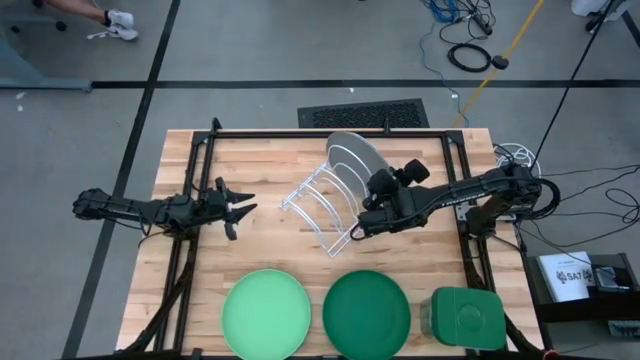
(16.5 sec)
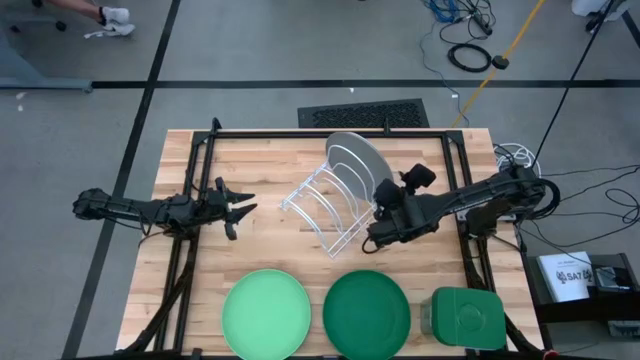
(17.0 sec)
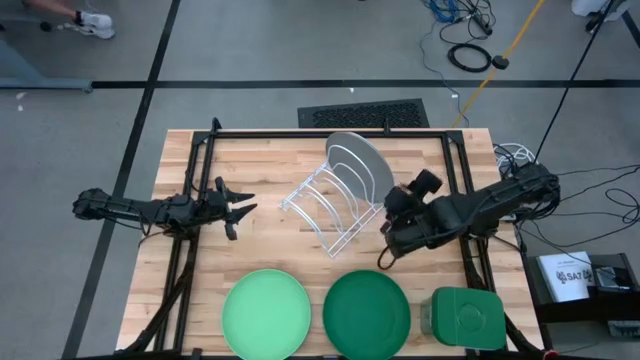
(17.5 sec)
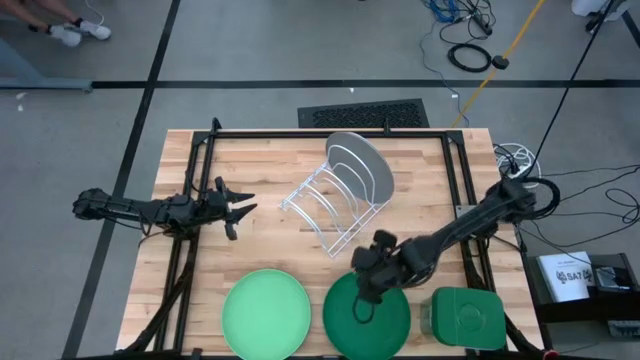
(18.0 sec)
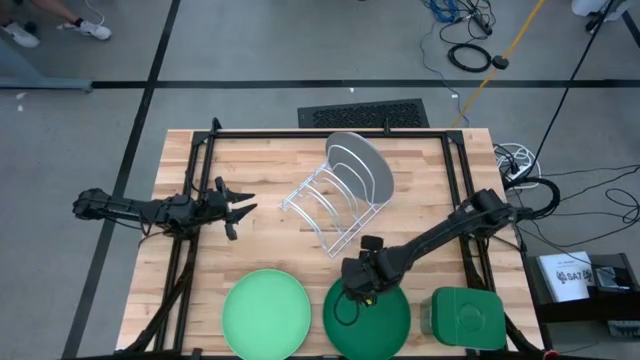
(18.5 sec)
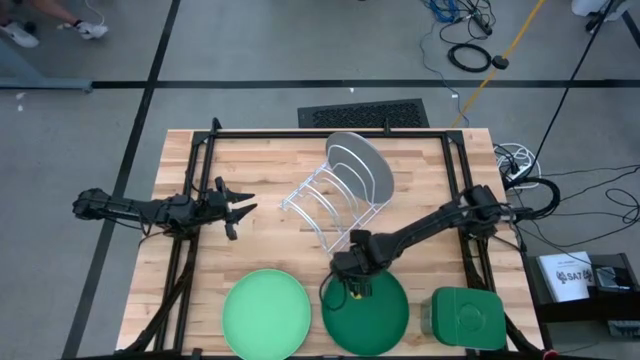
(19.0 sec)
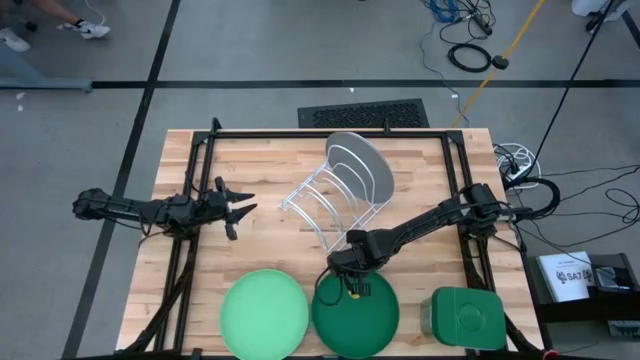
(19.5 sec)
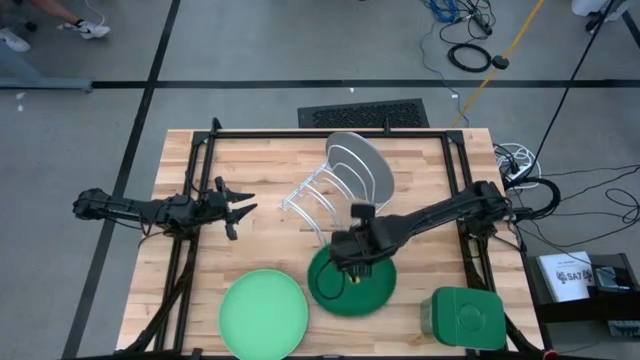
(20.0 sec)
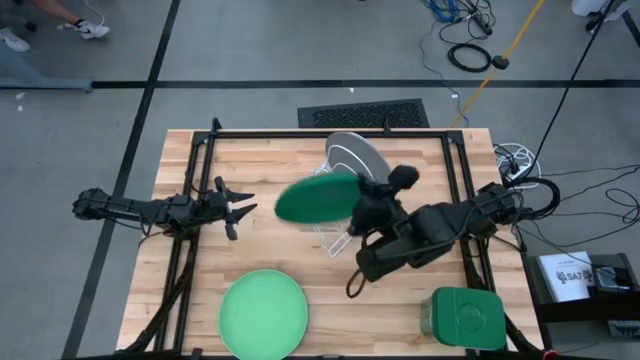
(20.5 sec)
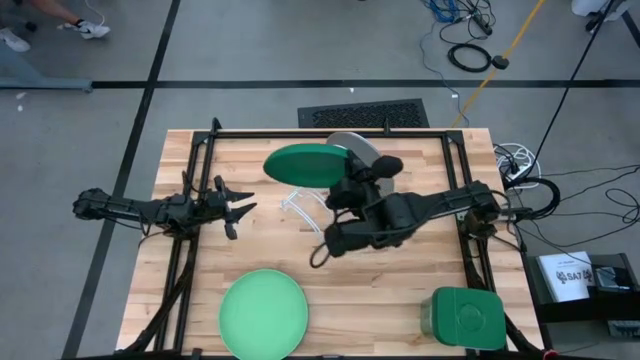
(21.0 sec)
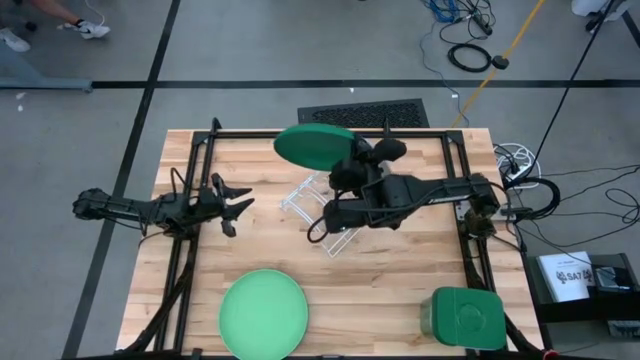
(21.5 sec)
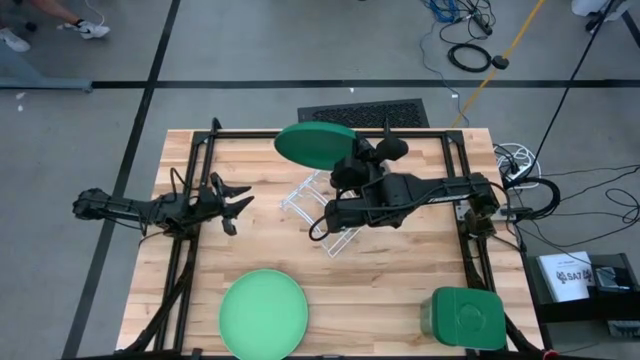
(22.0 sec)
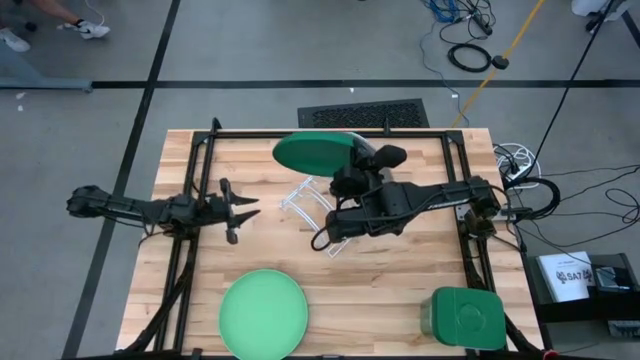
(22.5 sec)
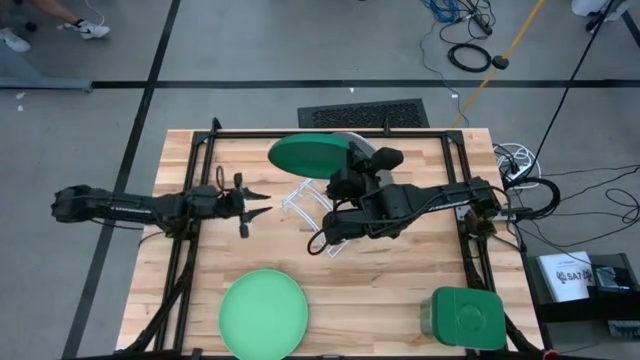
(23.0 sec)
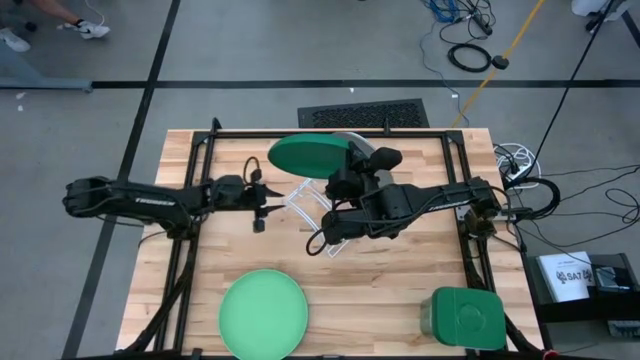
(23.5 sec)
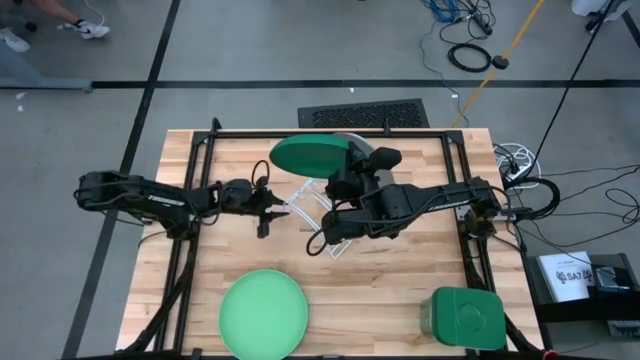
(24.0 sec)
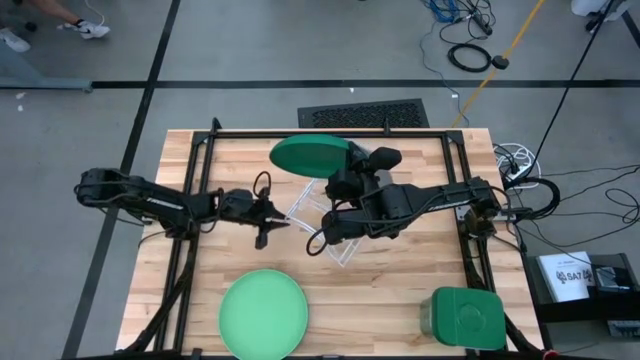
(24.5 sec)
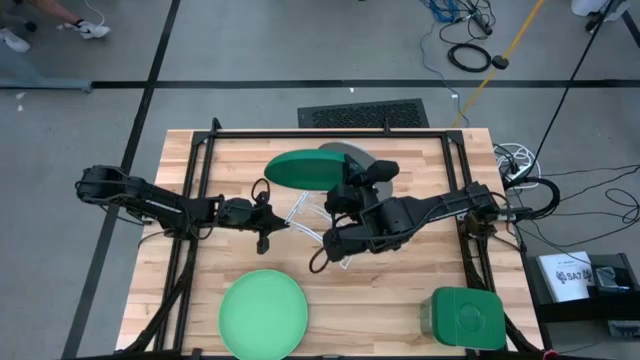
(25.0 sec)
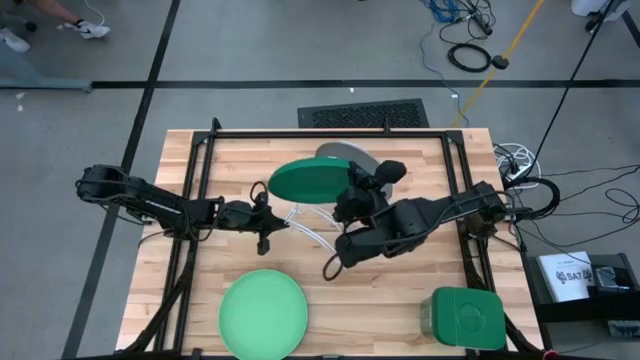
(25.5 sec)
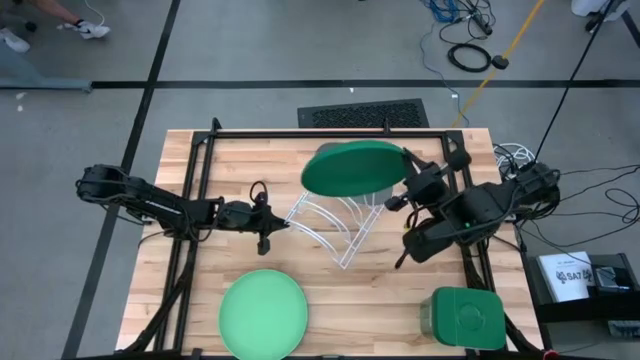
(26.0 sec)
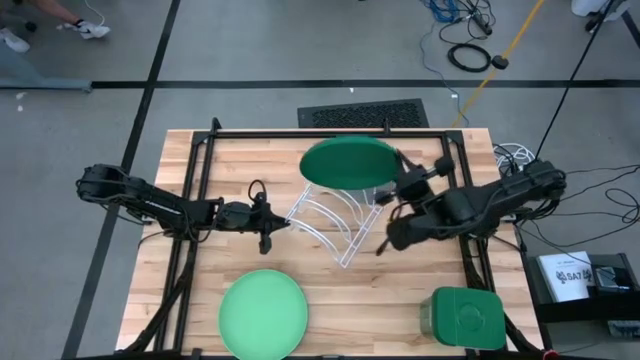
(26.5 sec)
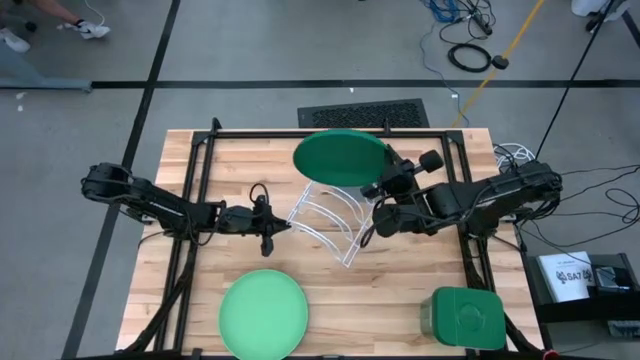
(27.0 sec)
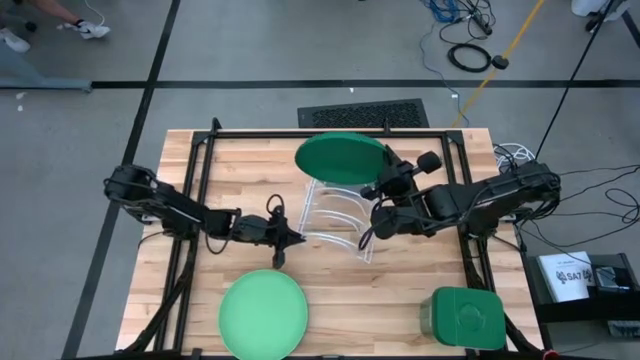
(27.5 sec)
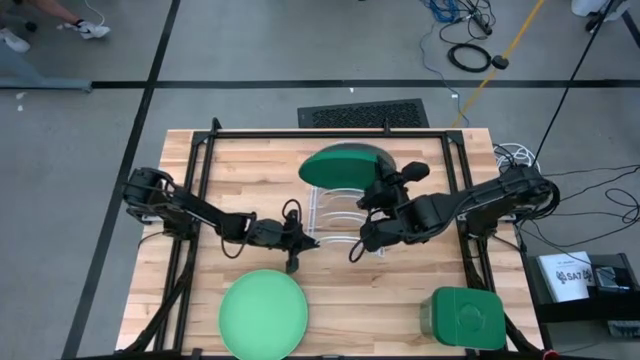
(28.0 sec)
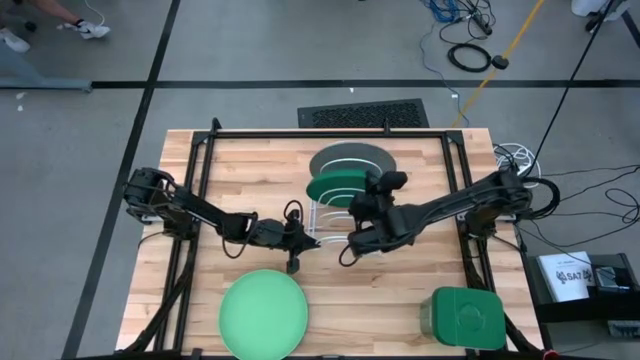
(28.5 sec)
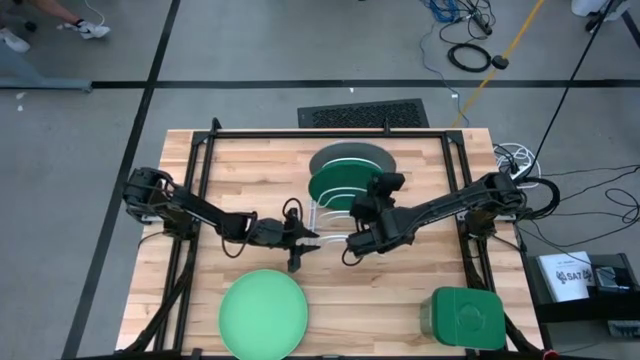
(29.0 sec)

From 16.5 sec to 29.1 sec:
Task: Sort dishes
Put the dark green plate into the dish rack

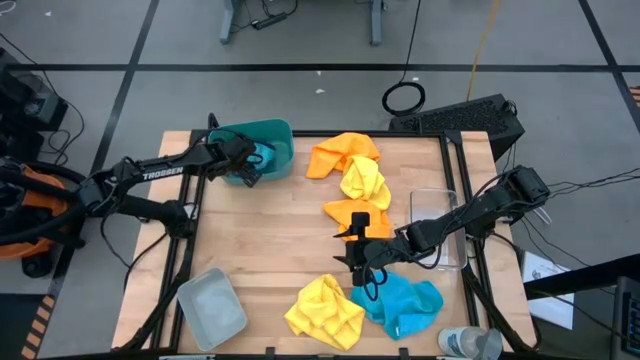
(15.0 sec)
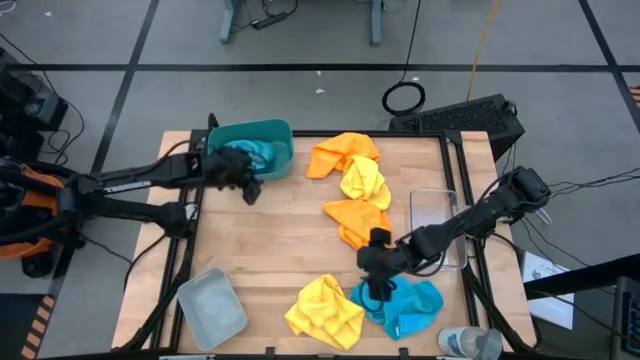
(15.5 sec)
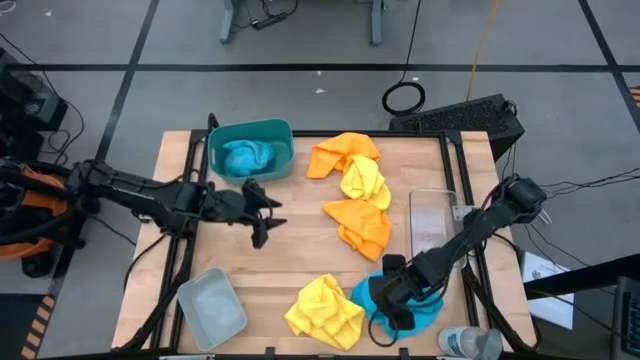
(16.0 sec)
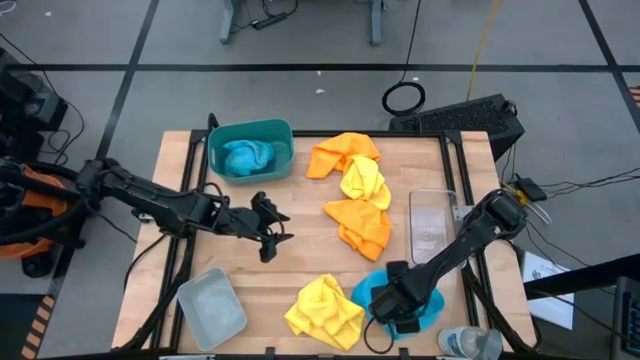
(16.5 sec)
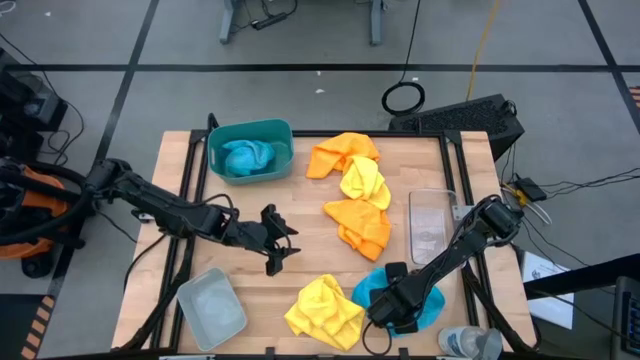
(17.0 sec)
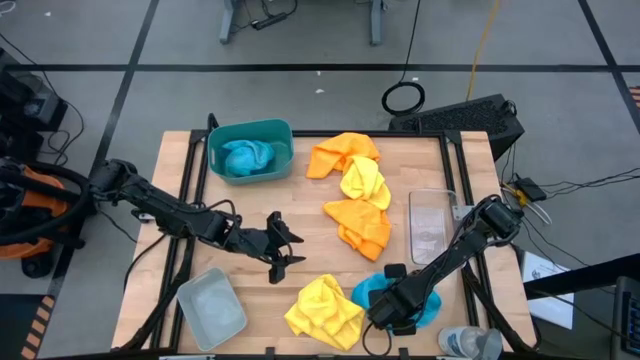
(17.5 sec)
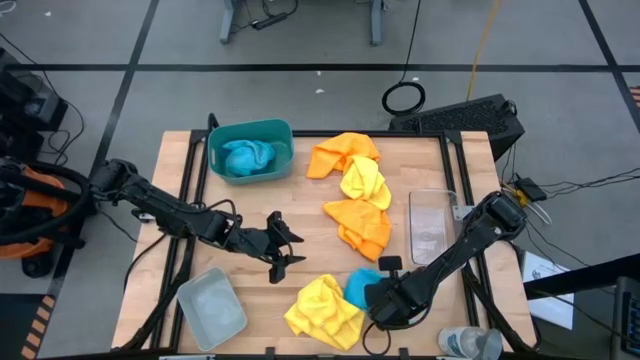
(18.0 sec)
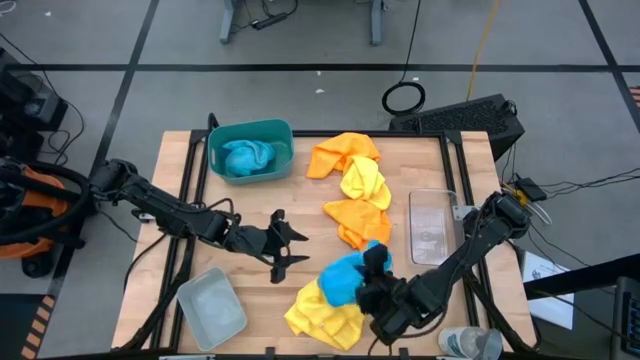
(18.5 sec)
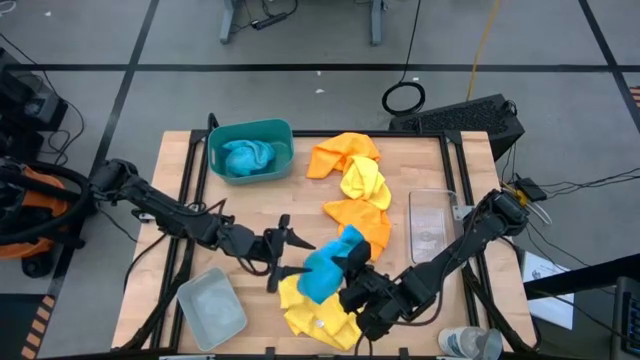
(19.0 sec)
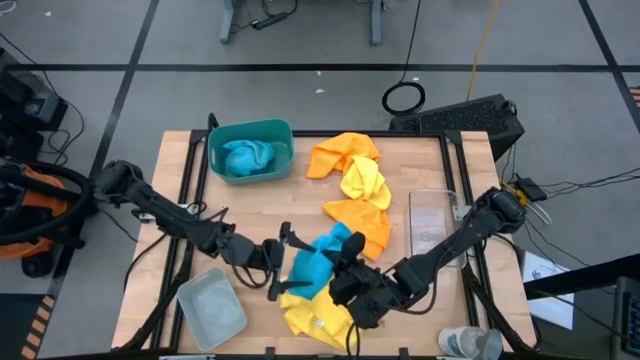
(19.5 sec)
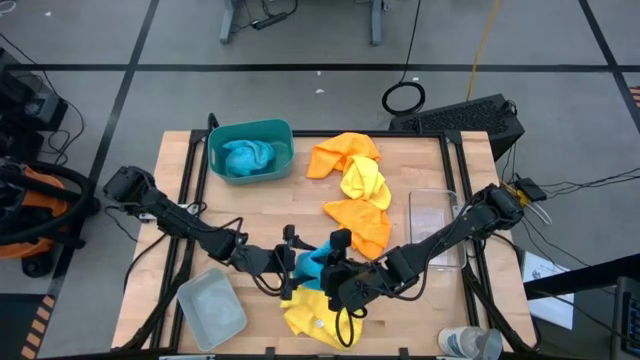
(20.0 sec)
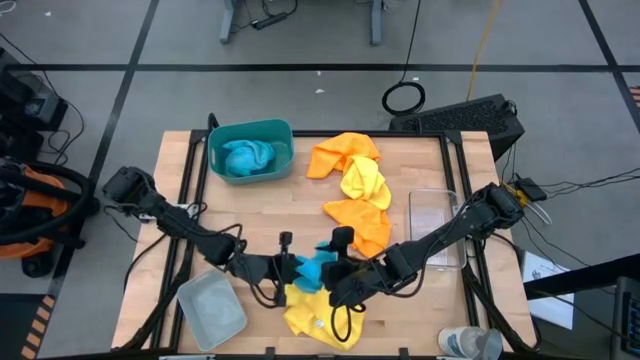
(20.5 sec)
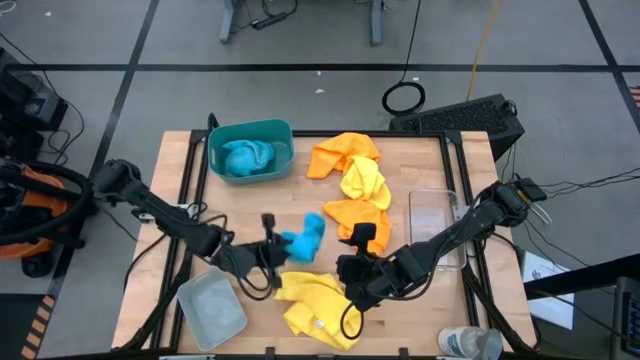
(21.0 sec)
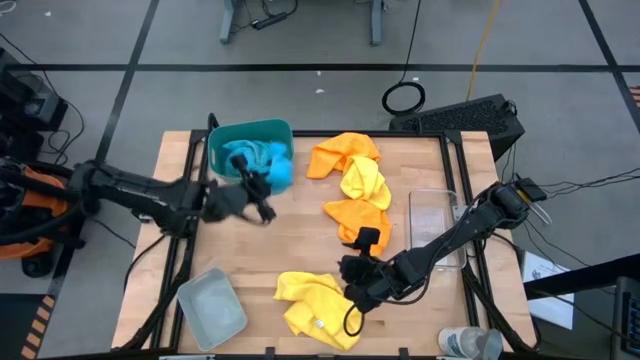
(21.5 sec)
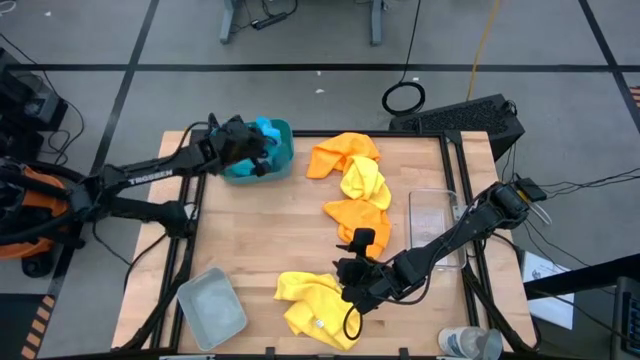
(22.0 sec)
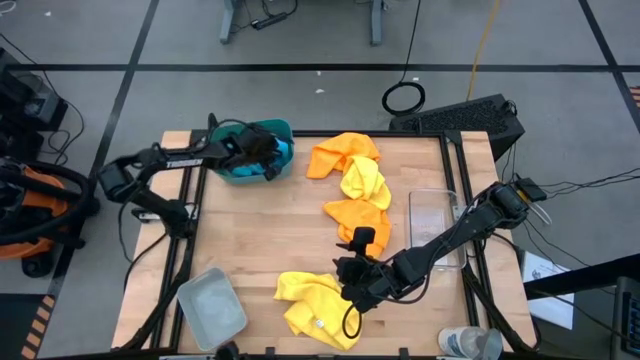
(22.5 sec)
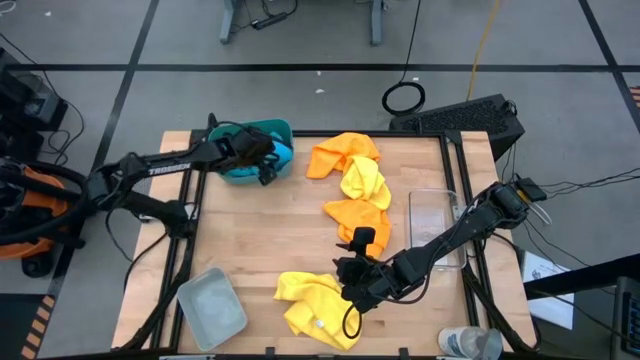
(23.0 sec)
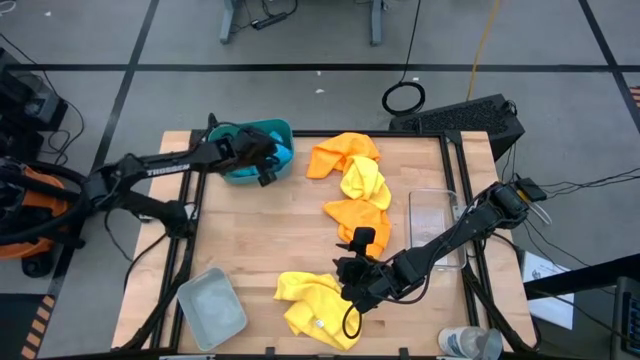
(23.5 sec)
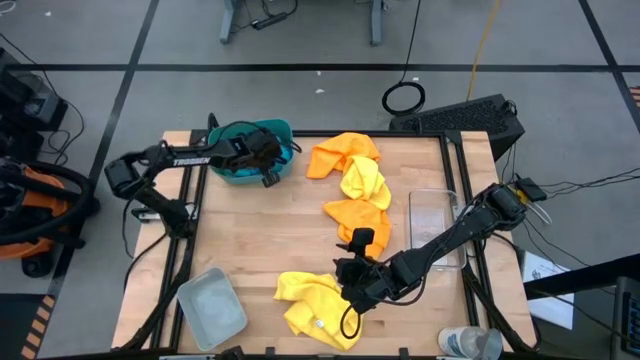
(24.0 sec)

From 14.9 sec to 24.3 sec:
Task: Sort microfiber towel by color & place in baskets
Put the blue microfiber cloth into the blue bin
